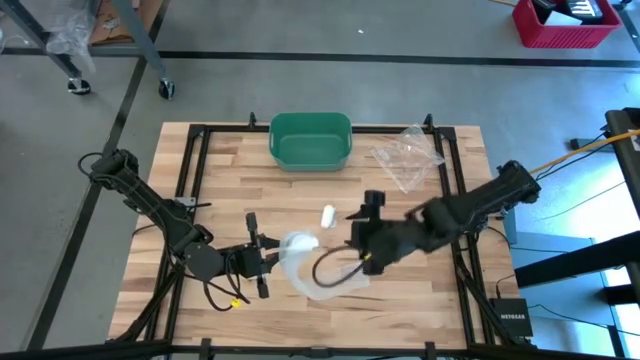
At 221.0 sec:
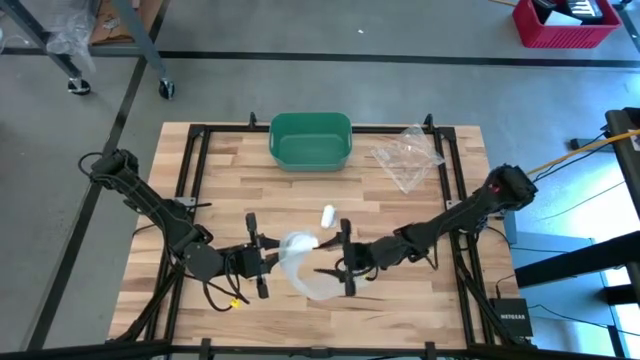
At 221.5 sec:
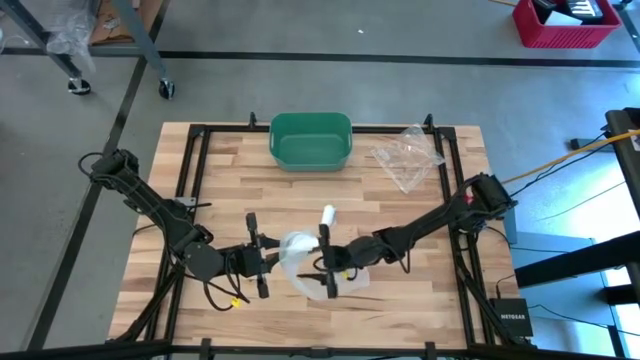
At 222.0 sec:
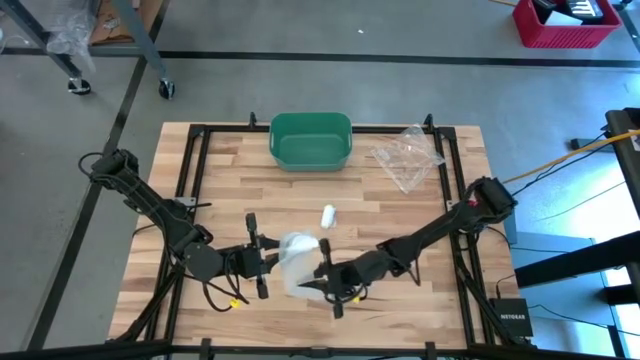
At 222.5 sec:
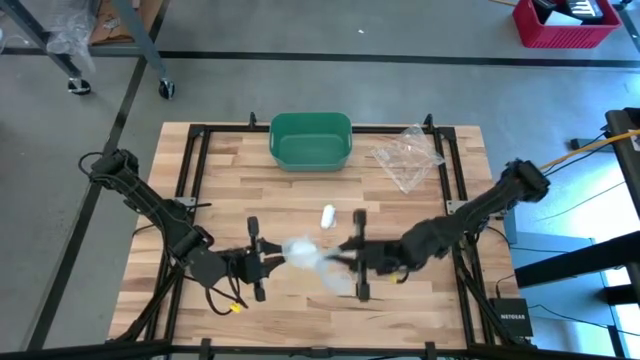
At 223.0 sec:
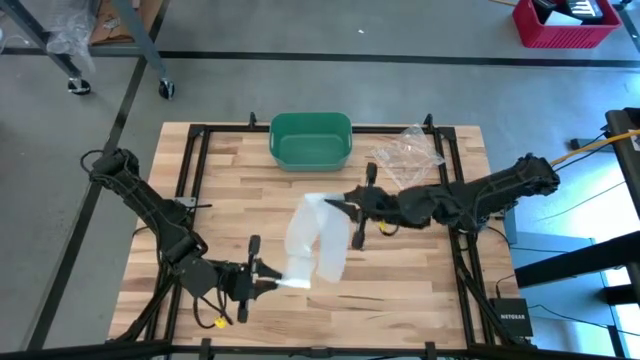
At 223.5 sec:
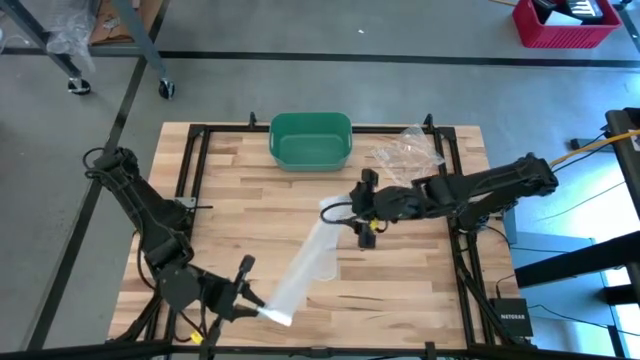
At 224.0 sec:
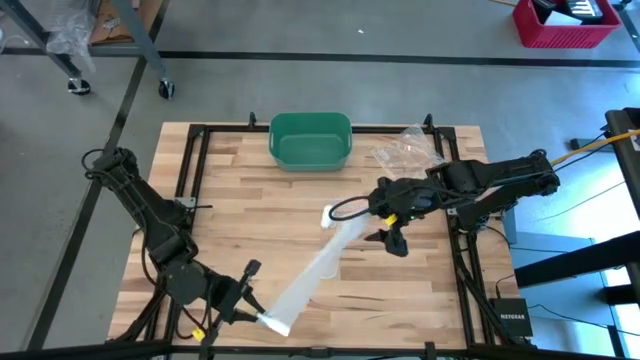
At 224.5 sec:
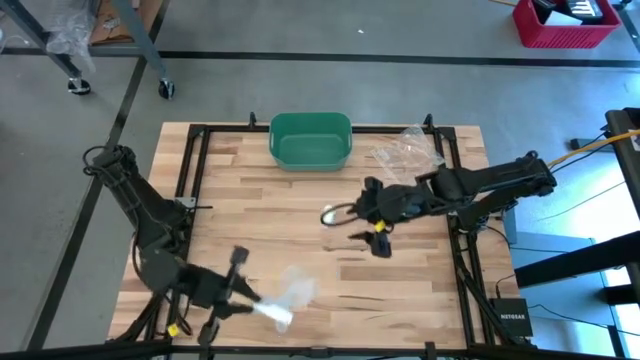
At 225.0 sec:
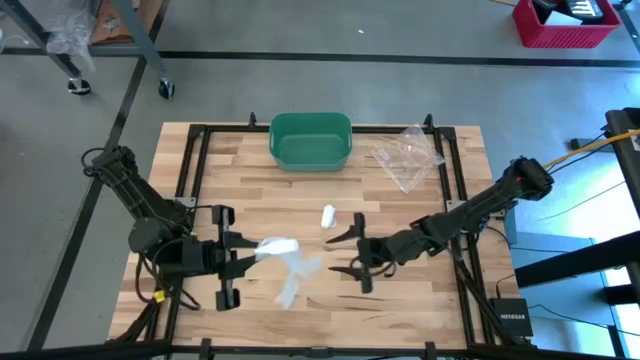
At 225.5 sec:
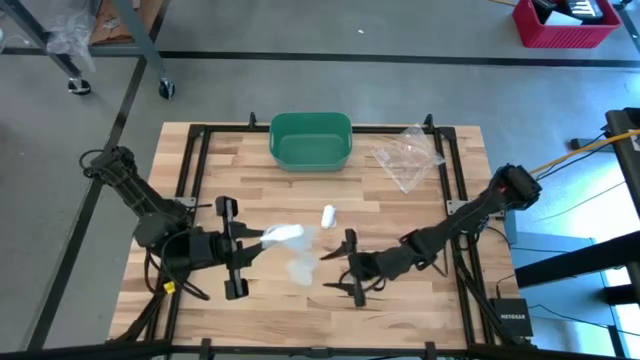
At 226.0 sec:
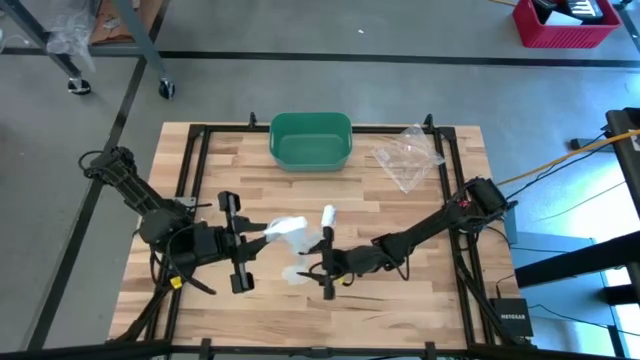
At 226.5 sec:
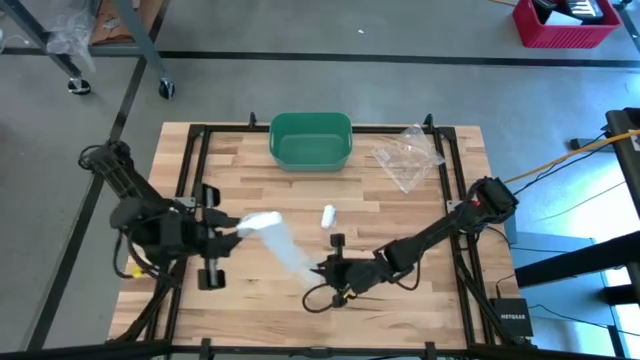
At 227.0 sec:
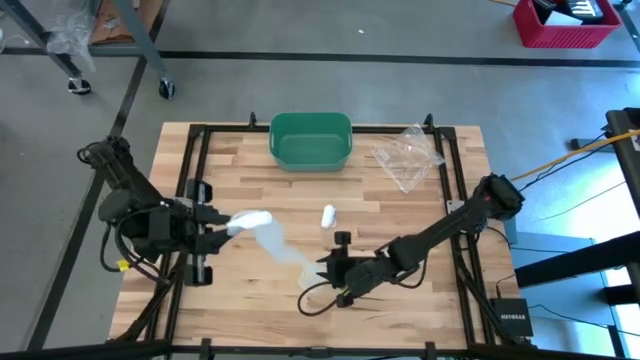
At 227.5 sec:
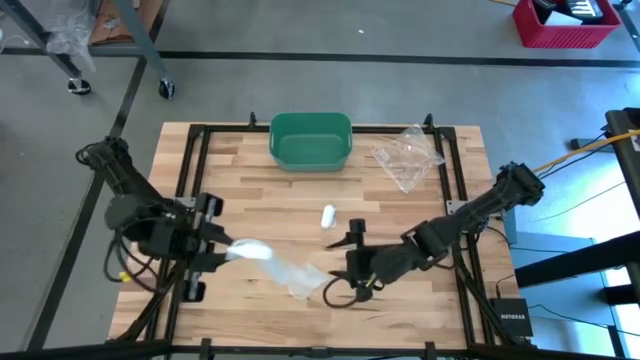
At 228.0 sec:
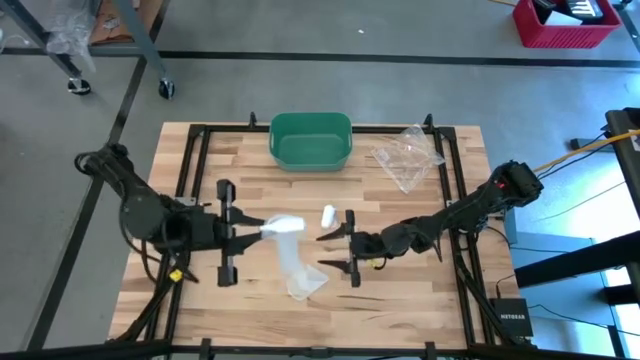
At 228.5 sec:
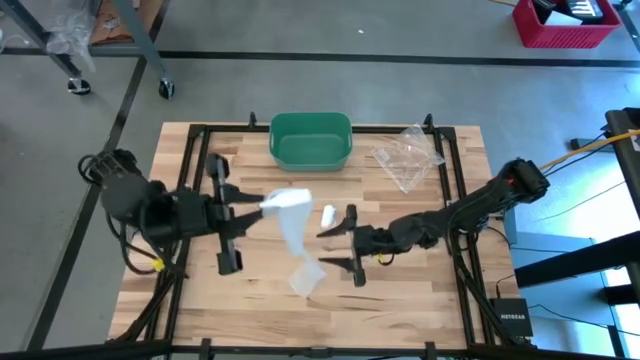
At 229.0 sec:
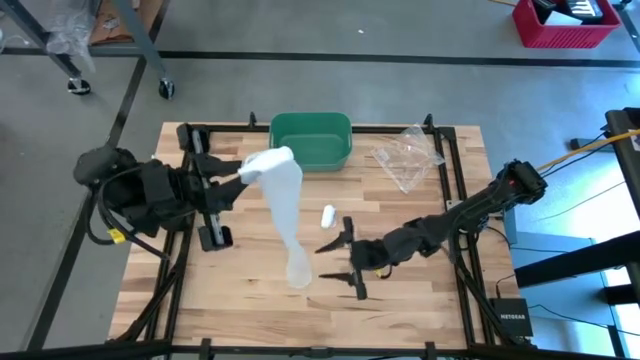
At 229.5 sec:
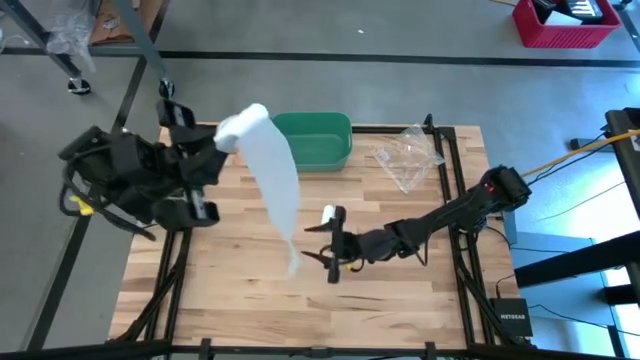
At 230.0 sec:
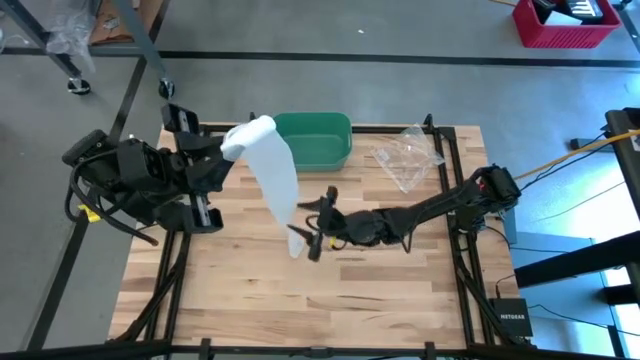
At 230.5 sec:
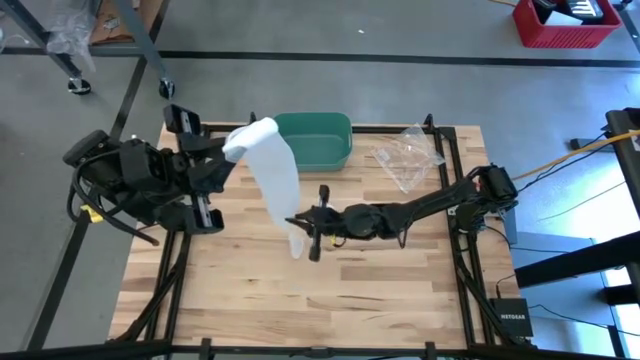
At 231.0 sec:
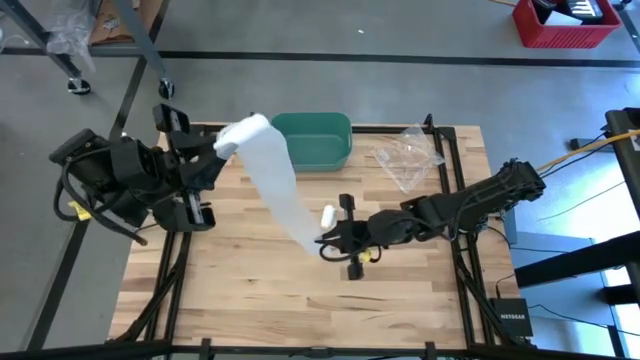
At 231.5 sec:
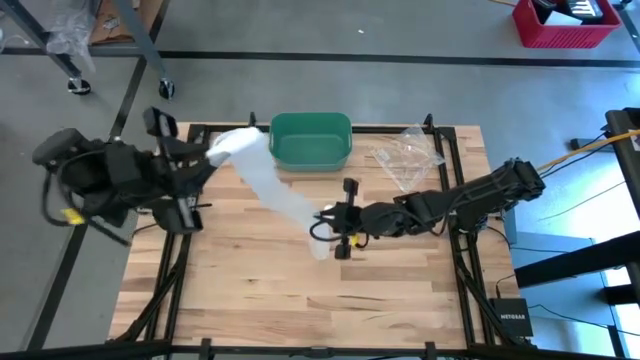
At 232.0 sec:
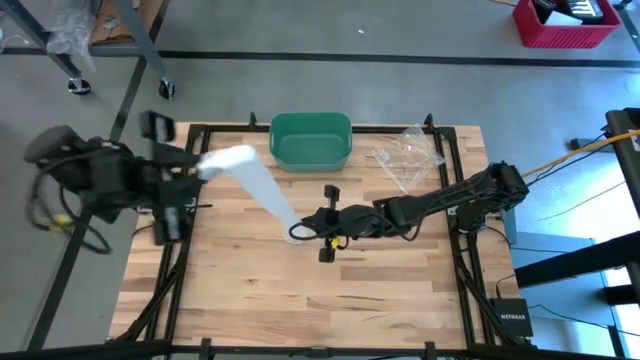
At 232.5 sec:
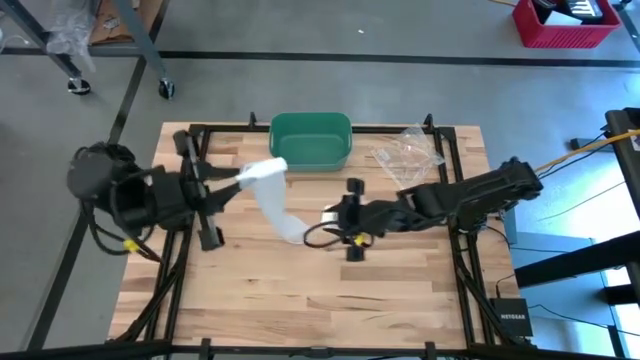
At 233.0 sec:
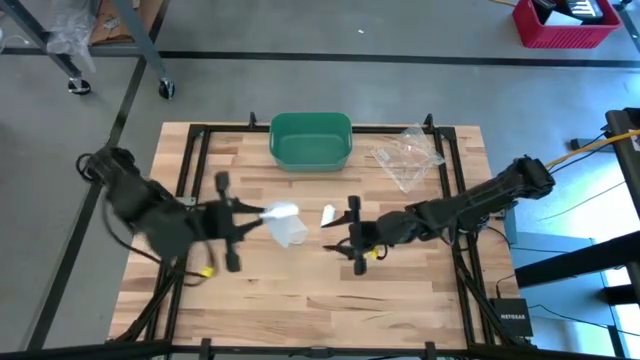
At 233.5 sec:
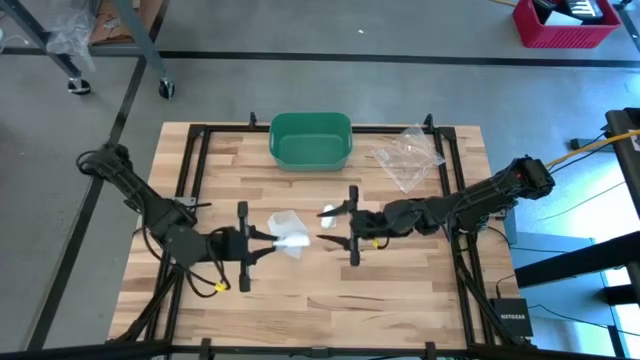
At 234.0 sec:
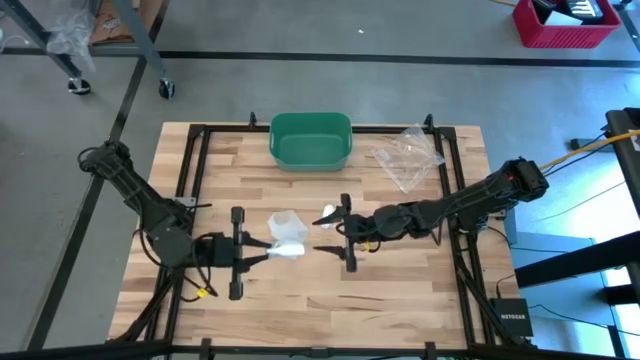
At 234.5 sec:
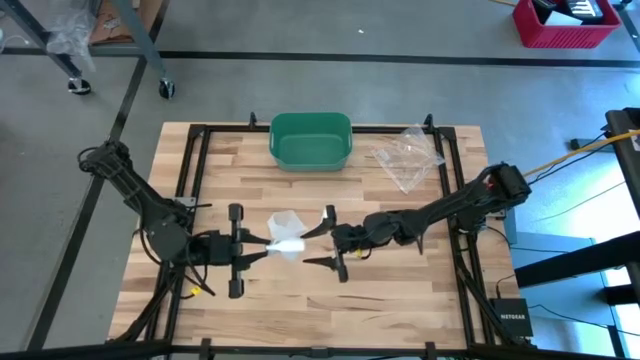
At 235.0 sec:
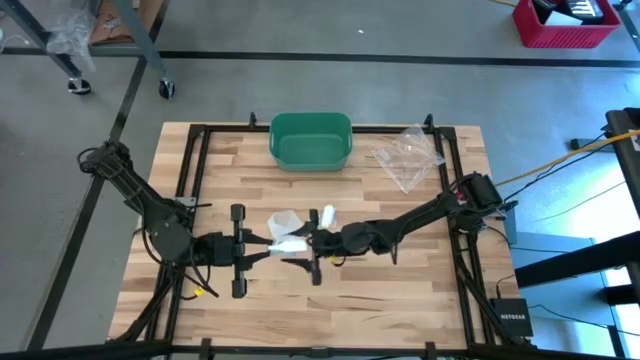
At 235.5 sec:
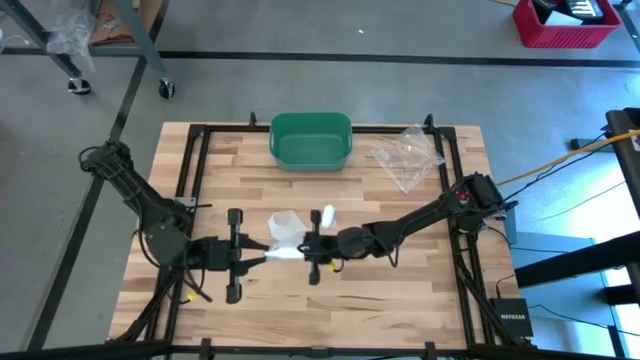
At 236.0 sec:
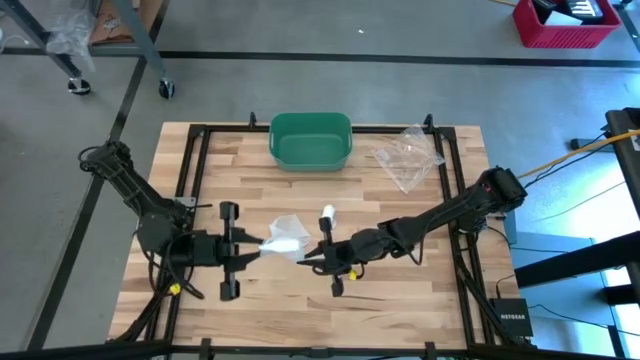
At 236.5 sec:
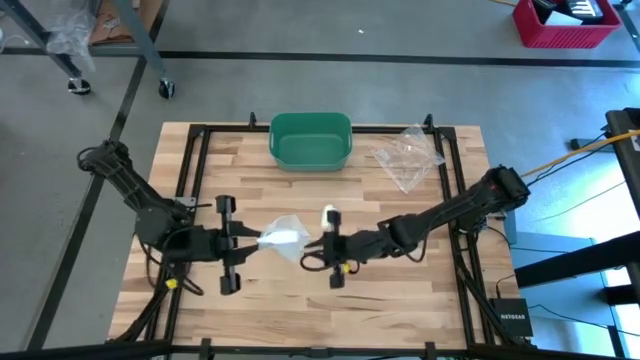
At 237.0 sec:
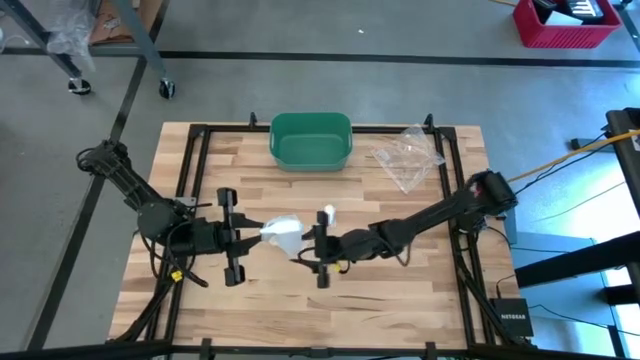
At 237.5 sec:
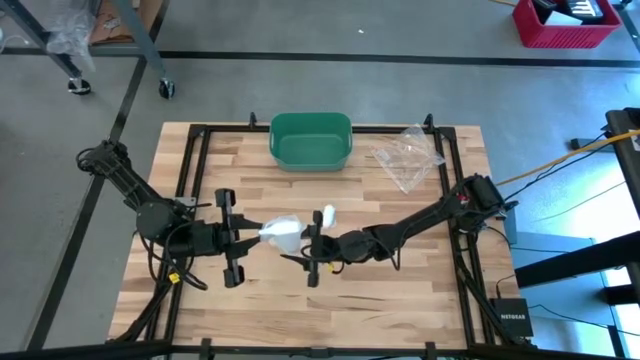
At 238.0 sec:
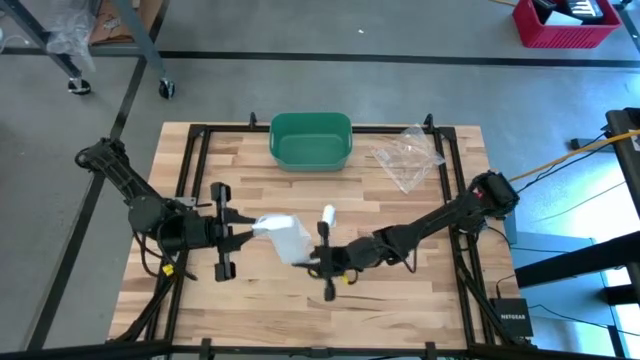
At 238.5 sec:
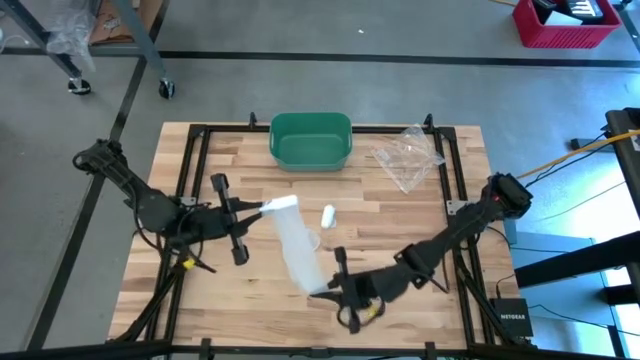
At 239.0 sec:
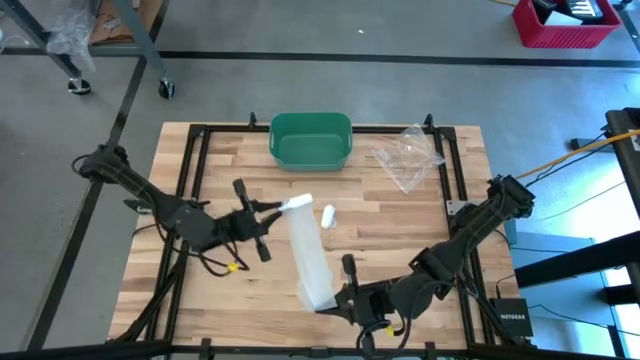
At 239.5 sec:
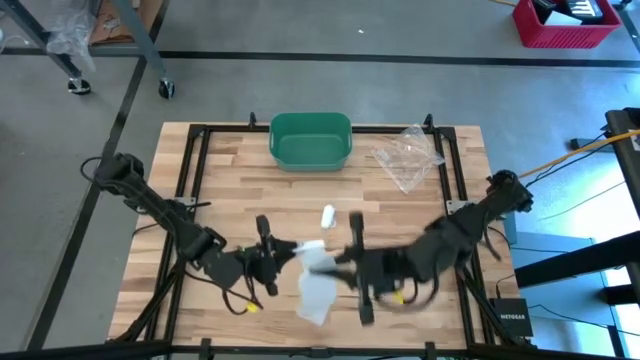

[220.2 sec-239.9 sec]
Task: Roll bandage
Roll the bottom white bandage
